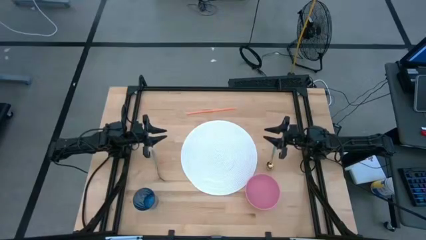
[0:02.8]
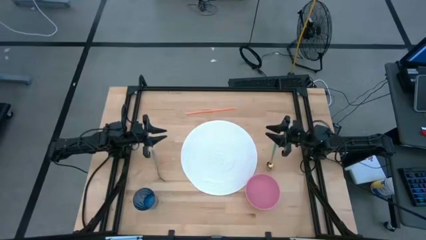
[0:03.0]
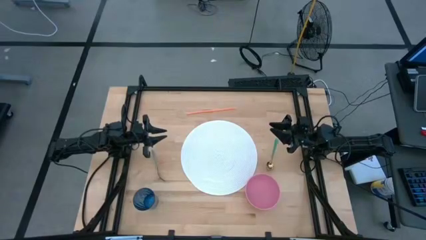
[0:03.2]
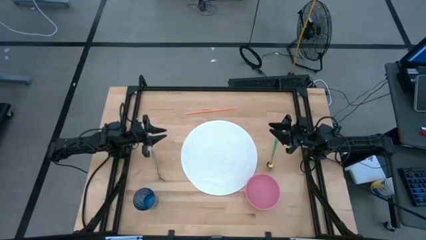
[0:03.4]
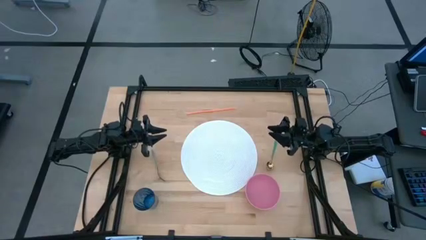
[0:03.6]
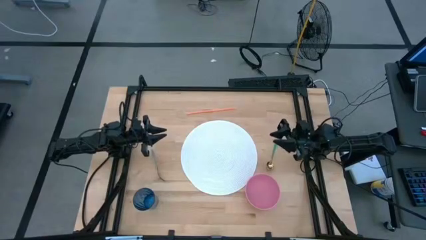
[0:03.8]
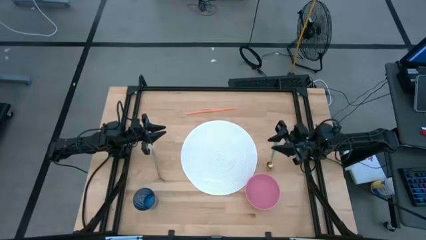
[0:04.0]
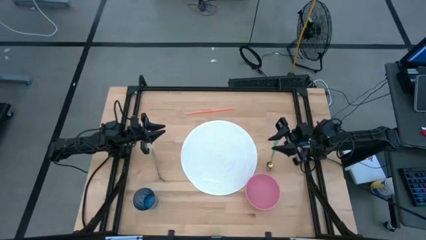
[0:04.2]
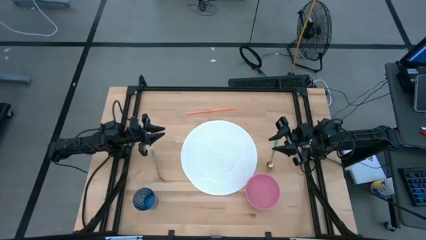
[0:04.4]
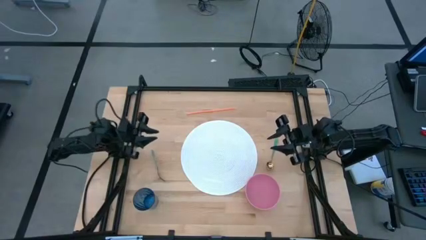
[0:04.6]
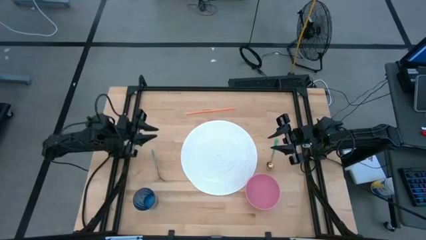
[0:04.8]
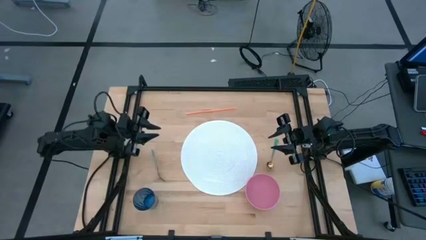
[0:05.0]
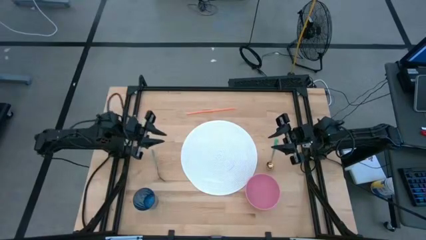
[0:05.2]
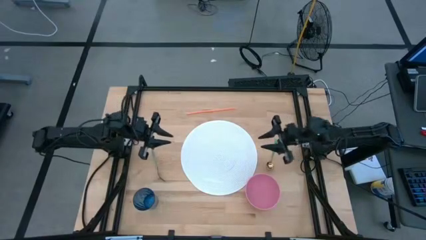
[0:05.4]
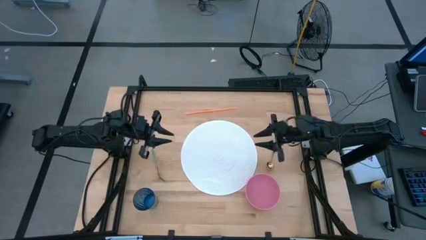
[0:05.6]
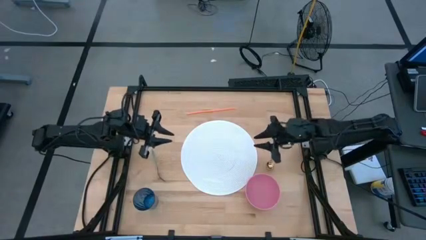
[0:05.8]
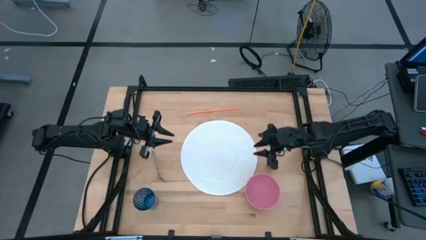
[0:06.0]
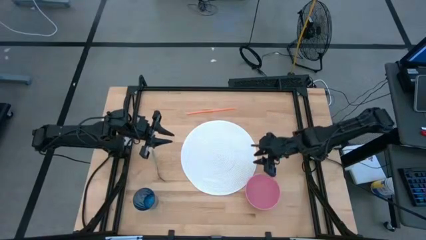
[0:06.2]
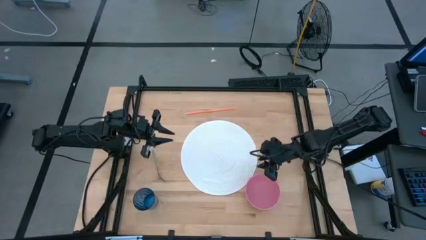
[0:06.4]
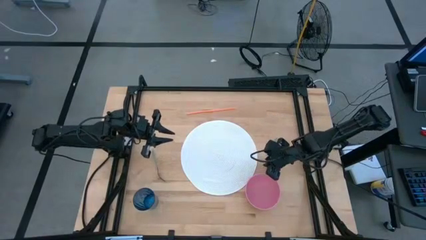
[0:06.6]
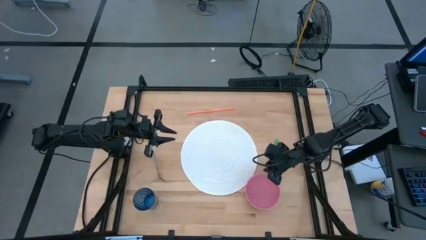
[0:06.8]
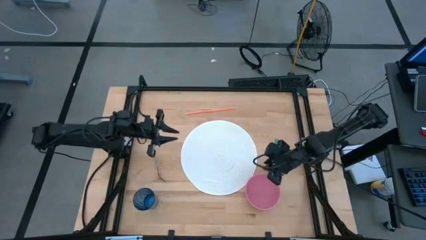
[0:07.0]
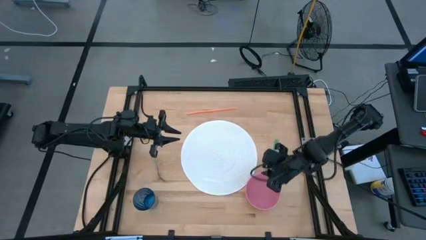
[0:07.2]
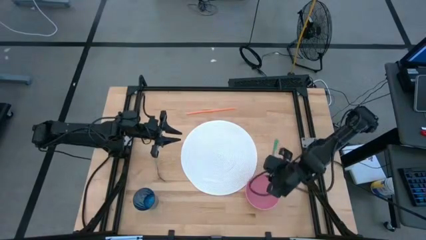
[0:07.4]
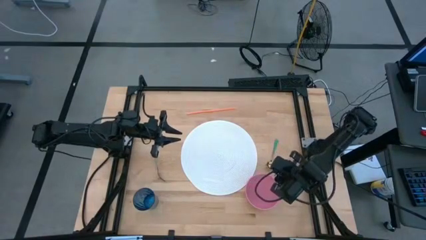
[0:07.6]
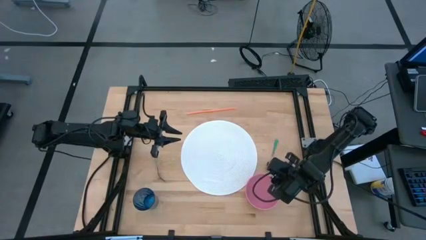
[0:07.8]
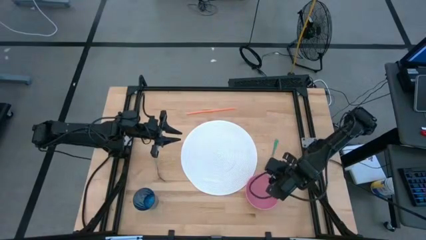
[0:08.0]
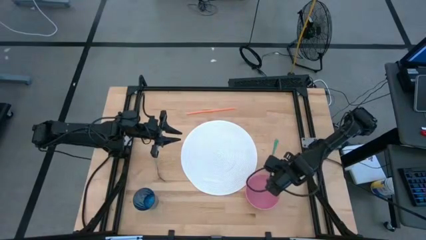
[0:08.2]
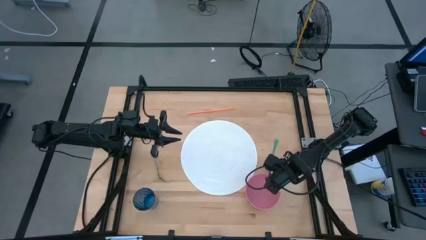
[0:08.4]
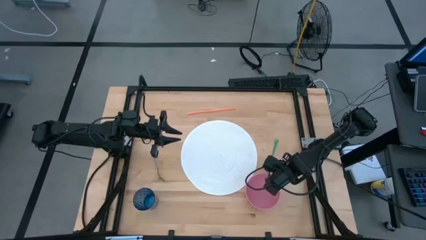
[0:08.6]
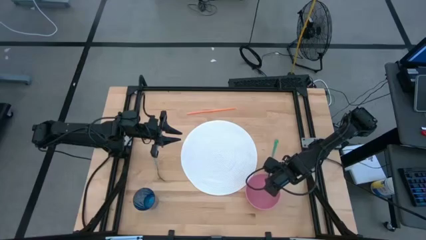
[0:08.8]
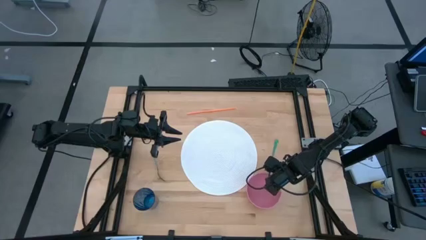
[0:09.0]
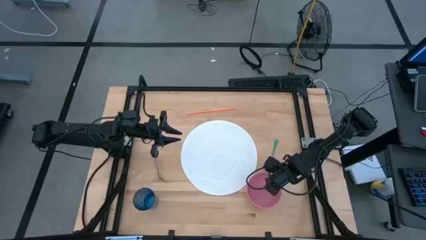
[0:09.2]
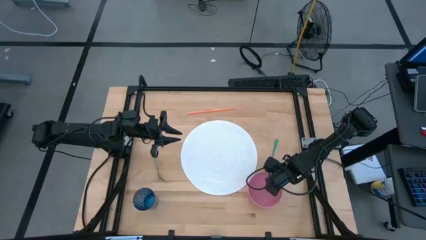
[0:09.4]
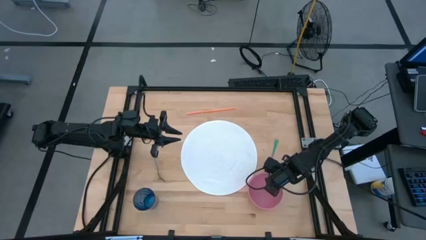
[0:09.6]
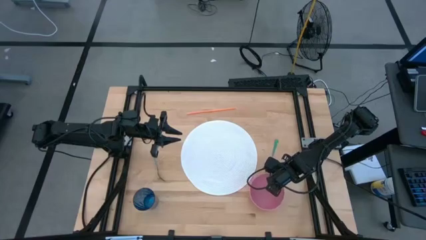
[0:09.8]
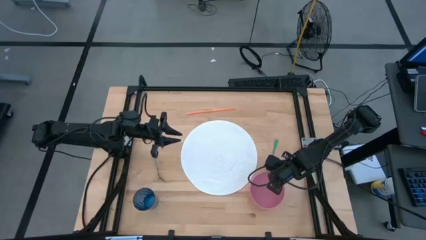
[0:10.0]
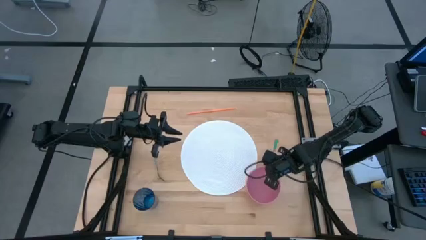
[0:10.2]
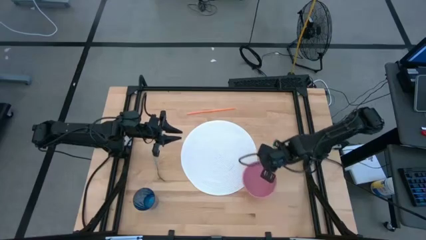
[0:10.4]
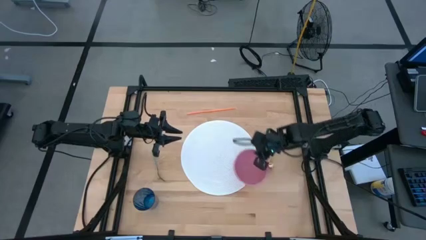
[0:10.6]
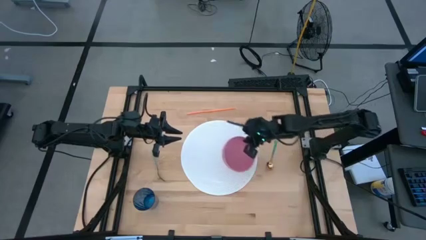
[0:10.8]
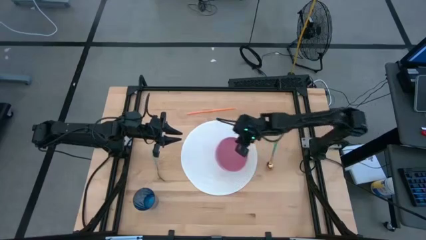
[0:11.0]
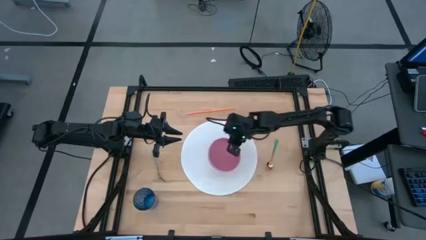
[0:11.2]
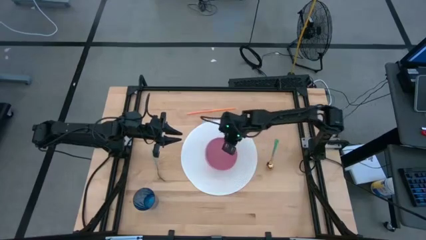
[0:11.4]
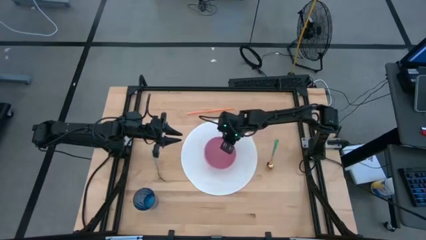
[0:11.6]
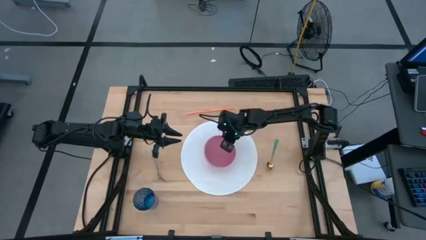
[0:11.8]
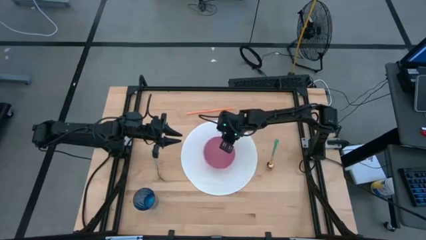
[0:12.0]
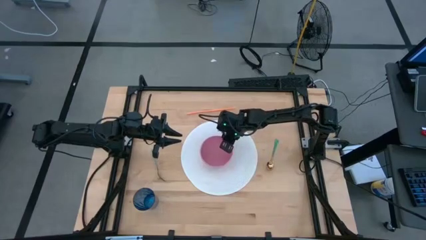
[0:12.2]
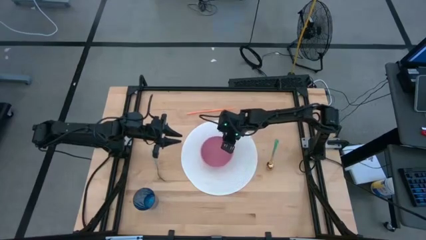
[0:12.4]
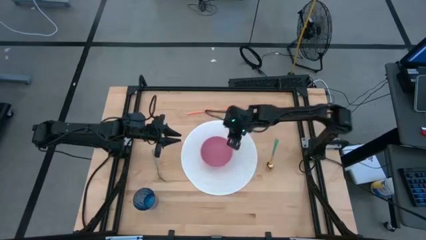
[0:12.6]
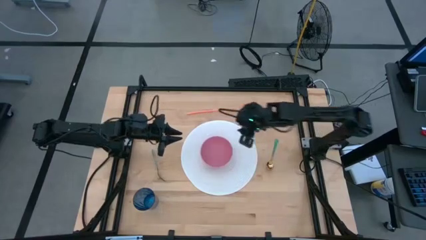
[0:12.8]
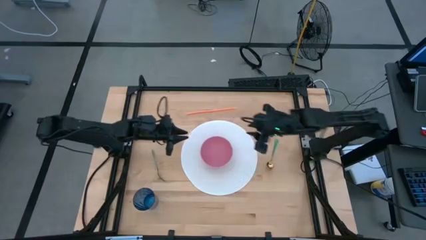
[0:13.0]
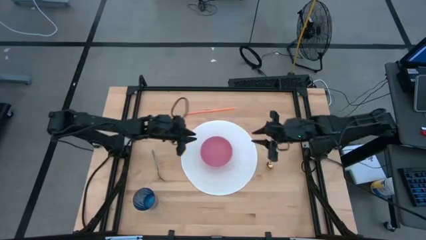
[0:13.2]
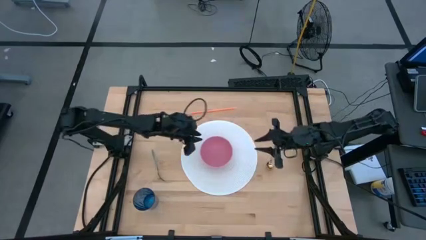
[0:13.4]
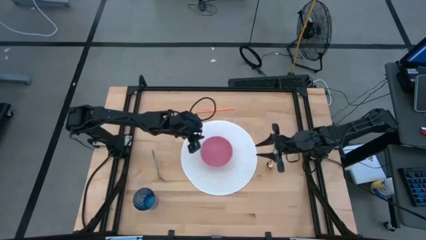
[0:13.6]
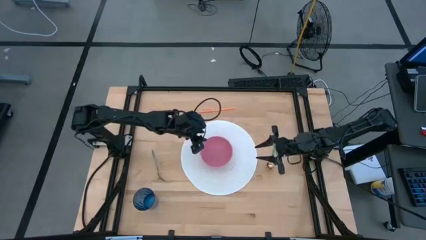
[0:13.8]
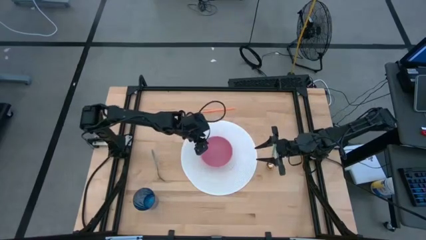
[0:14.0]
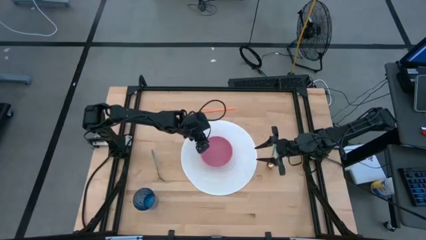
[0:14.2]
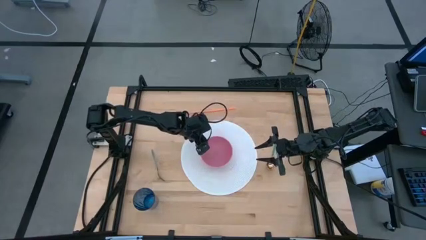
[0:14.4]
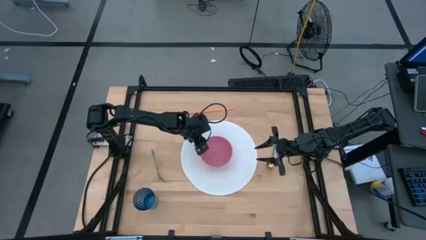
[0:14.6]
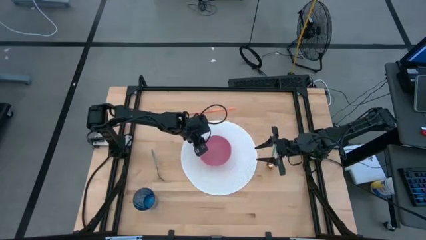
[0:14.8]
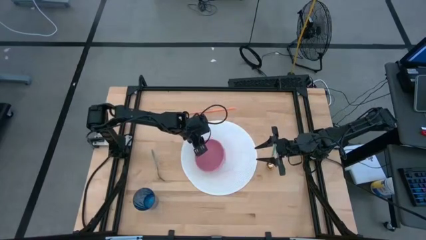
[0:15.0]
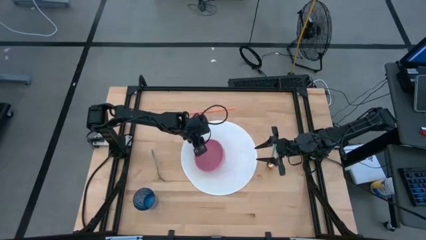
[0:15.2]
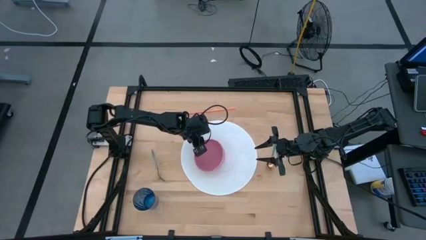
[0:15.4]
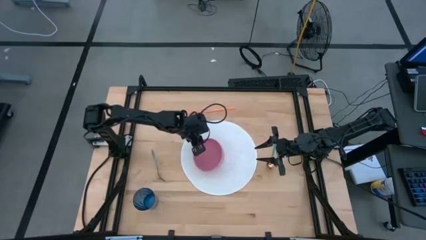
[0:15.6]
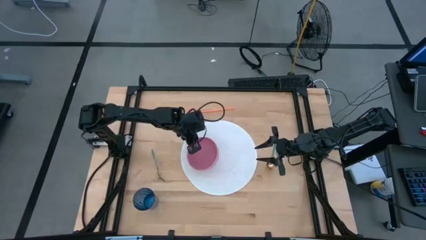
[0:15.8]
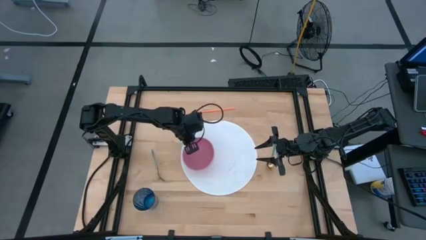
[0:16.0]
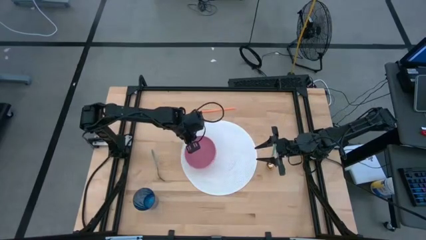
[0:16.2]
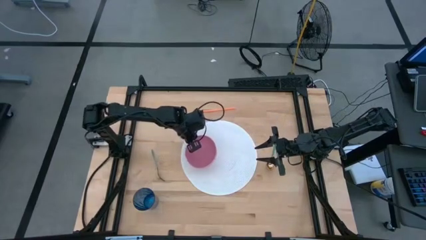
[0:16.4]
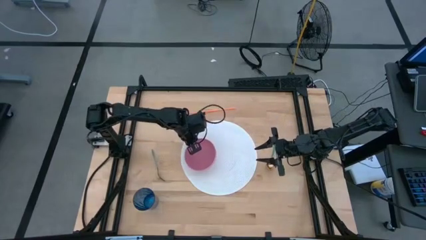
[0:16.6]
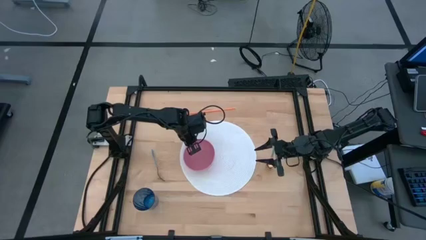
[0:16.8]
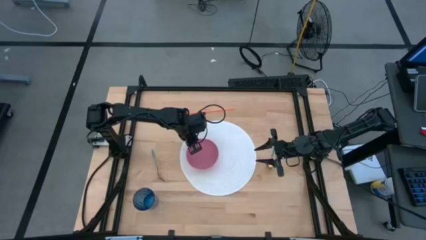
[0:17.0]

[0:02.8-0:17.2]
Task: Pick & Place Utensil
Put the pink bowl on the left of the white placemat

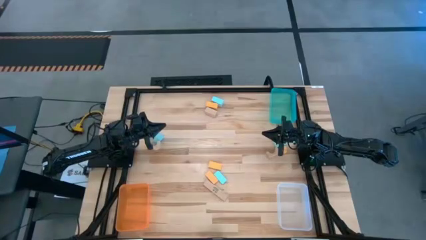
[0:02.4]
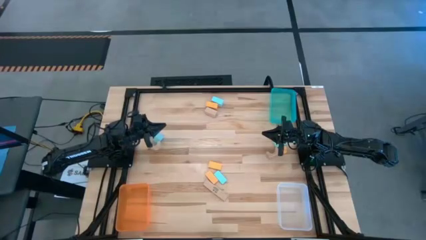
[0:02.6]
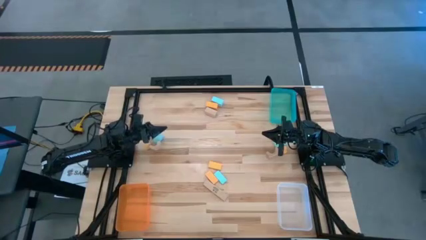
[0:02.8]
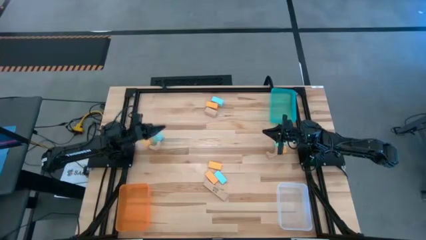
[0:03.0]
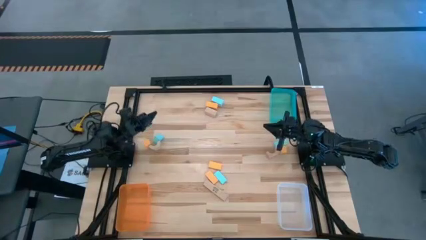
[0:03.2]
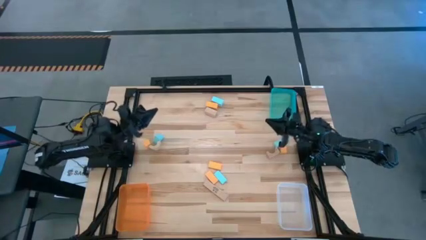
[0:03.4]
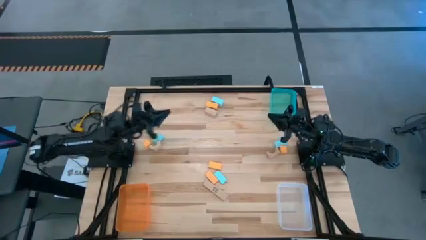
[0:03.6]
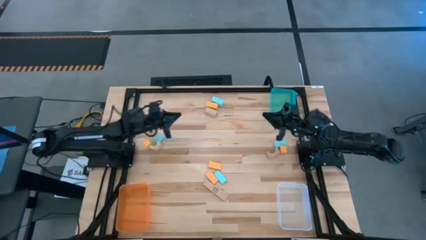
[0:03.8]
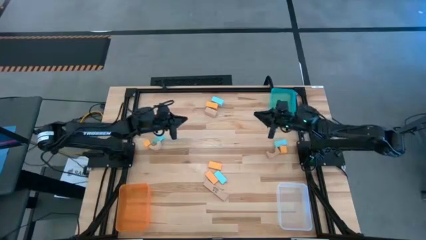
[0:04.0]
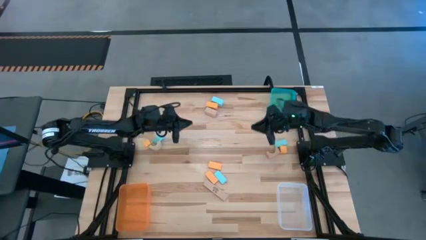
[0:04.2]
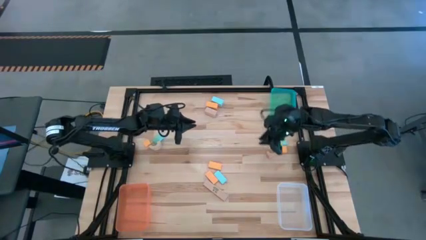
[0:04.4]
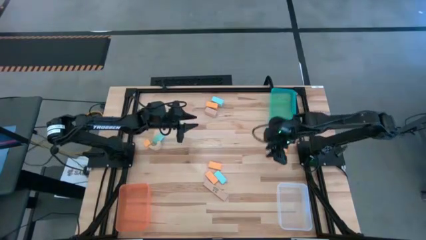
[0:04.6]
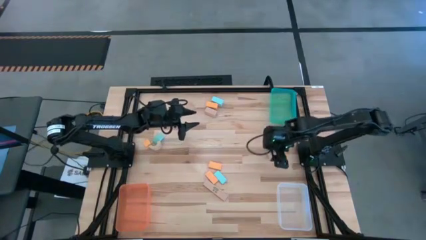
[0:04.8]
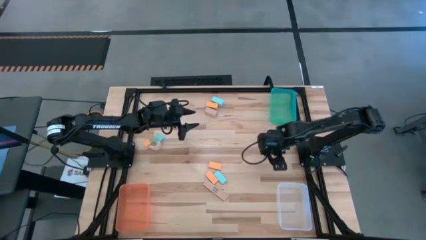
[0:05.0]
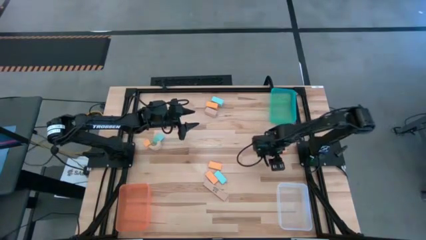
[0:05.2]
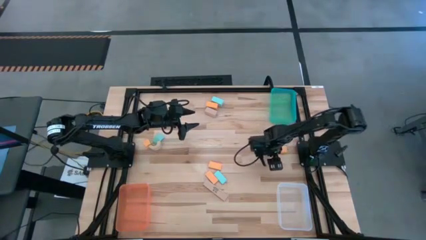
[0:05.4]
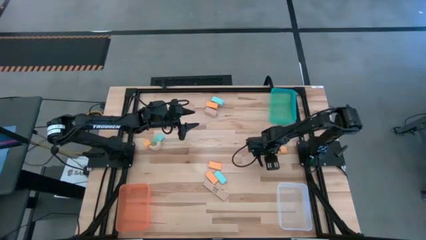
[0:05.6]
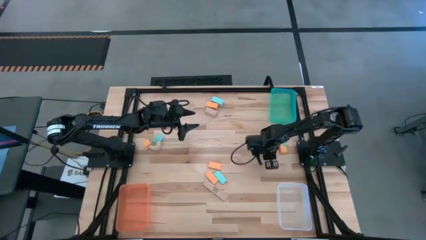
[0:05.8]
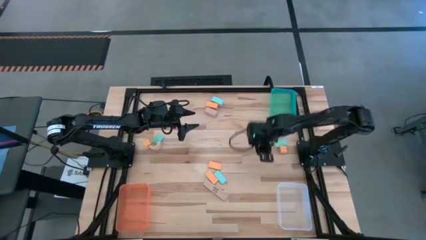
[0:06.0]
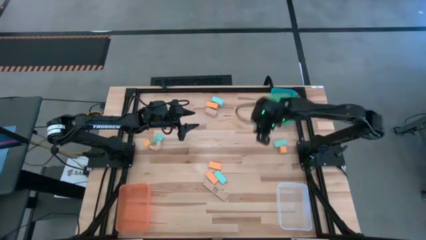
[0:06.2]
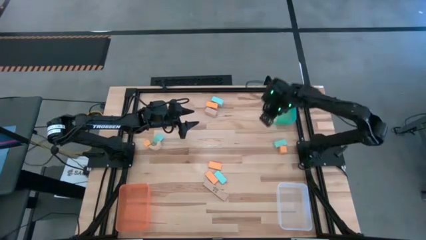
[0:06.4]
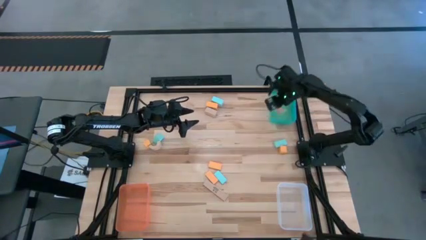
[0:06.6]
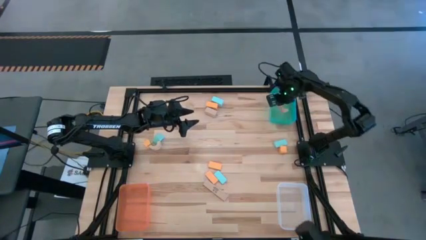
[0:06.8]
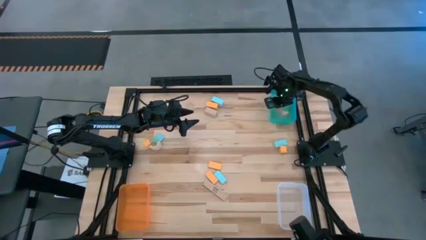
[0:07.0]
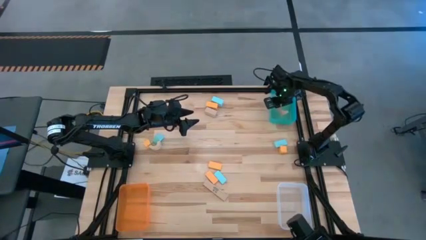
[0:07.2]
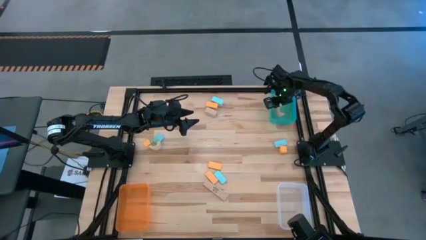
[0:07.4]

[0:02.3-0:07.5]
Task: Sort & place blocks by color
Put the brown block into the green bin
